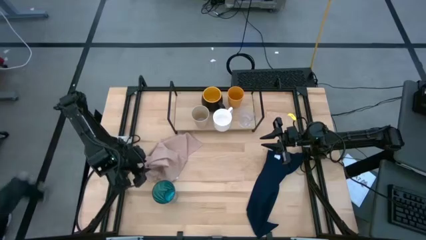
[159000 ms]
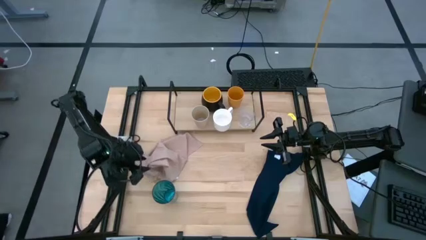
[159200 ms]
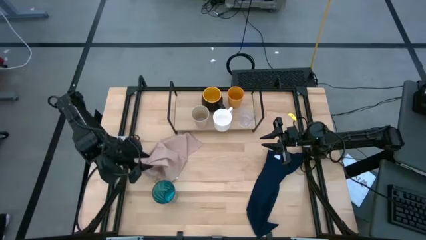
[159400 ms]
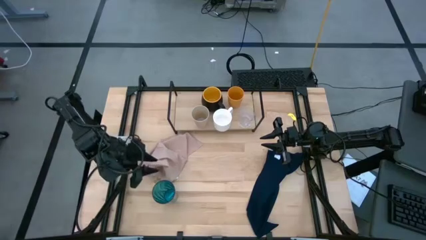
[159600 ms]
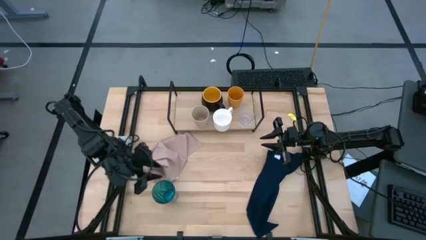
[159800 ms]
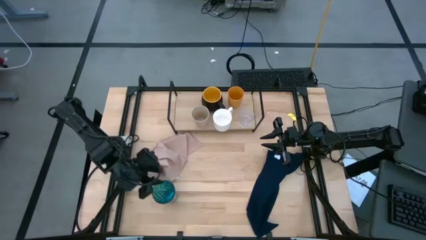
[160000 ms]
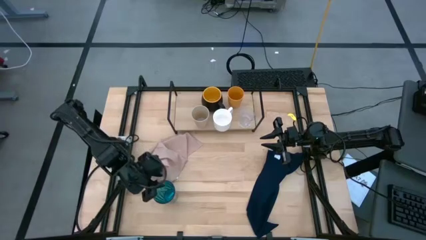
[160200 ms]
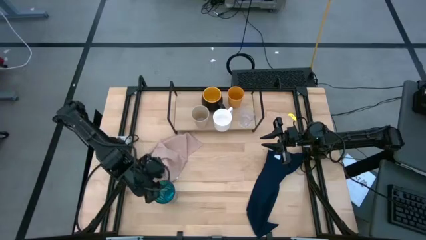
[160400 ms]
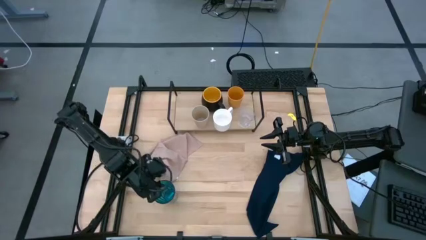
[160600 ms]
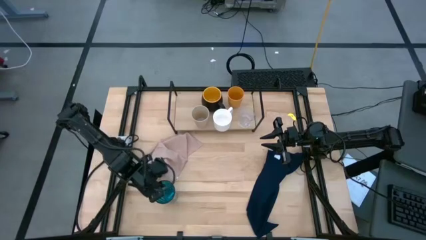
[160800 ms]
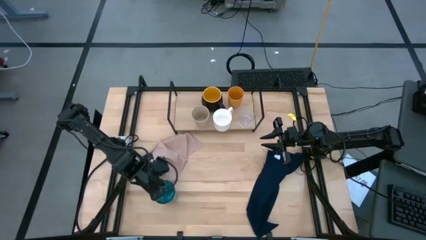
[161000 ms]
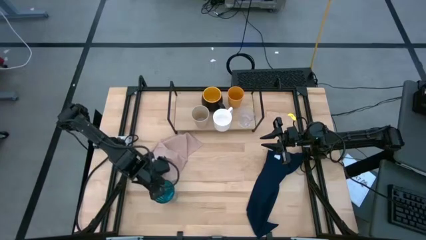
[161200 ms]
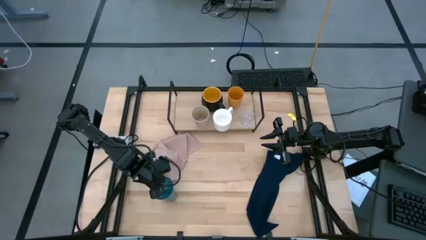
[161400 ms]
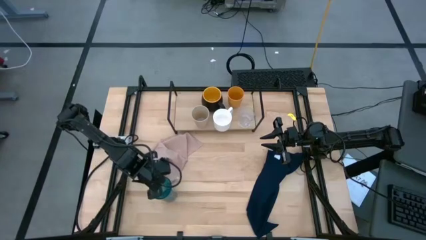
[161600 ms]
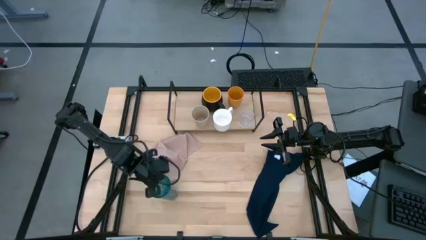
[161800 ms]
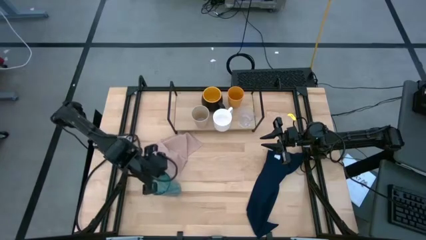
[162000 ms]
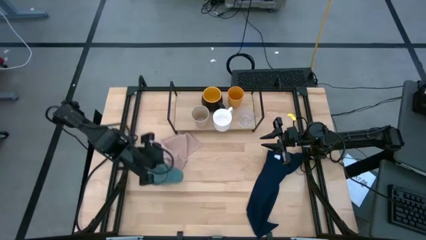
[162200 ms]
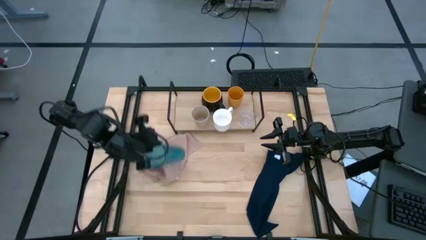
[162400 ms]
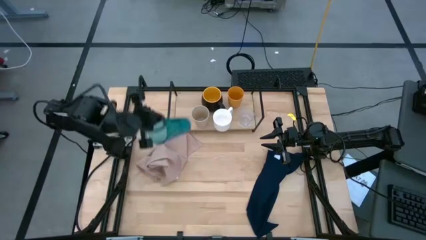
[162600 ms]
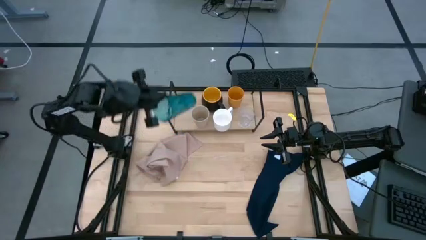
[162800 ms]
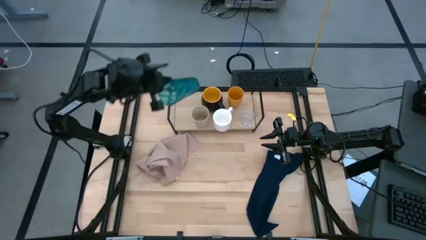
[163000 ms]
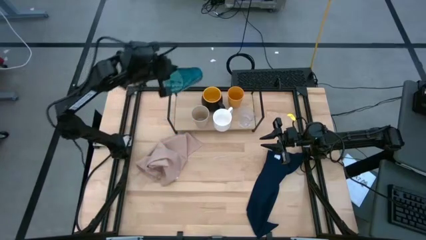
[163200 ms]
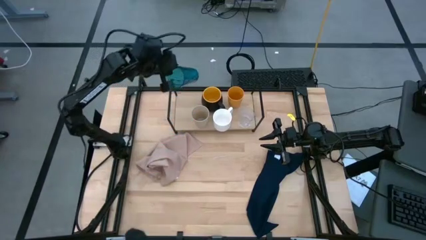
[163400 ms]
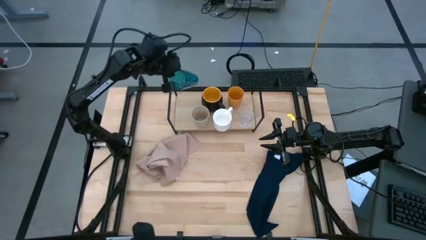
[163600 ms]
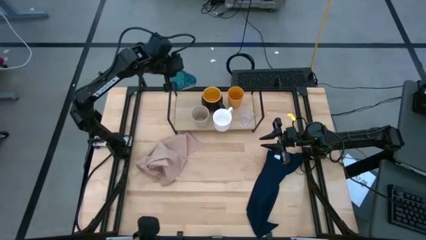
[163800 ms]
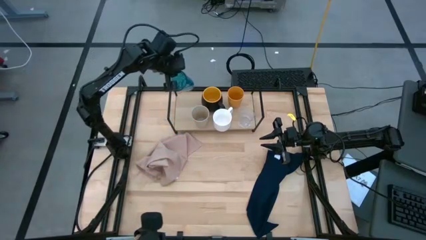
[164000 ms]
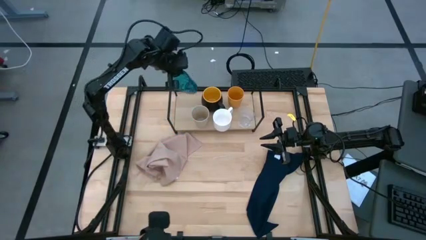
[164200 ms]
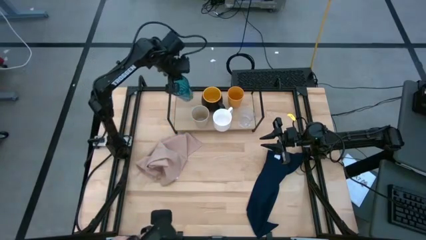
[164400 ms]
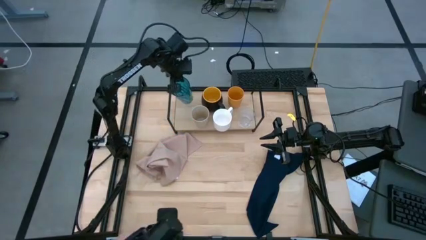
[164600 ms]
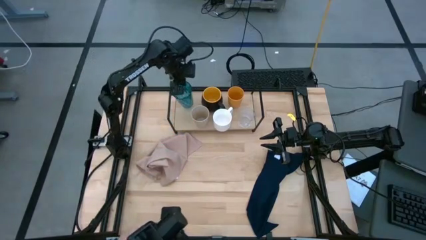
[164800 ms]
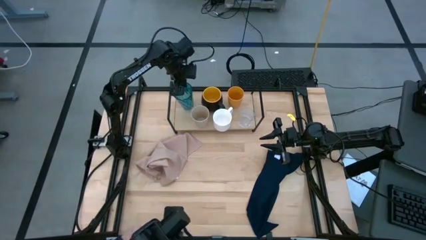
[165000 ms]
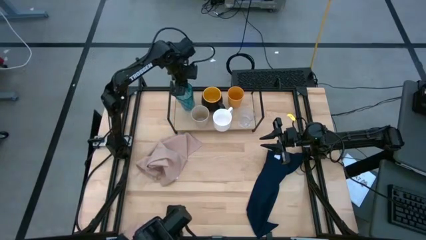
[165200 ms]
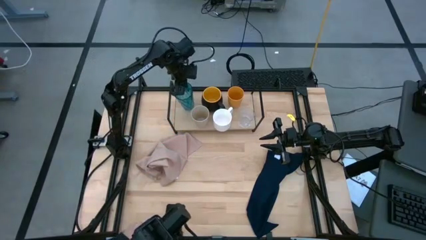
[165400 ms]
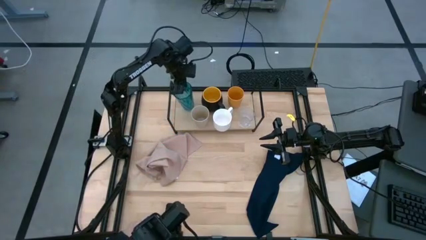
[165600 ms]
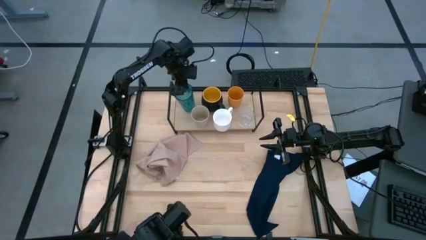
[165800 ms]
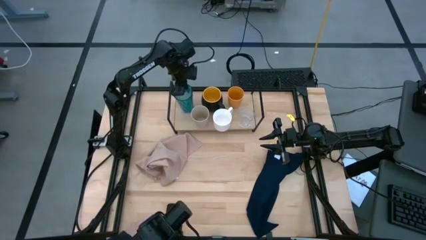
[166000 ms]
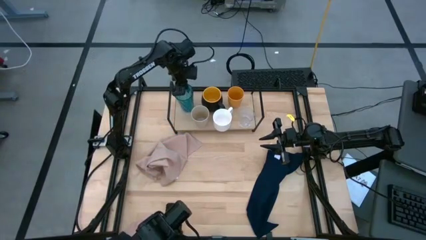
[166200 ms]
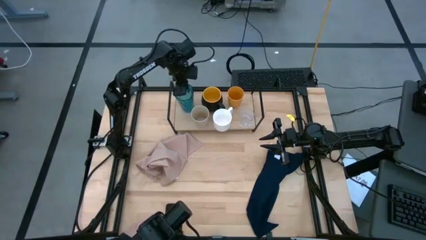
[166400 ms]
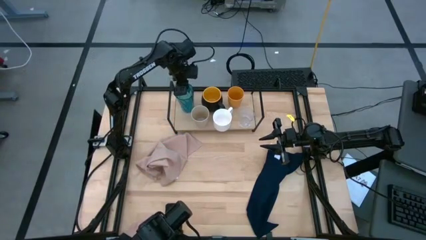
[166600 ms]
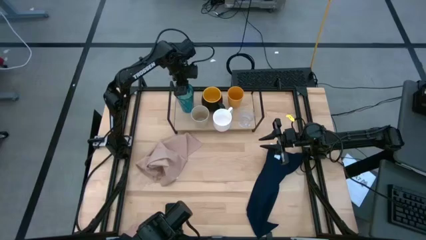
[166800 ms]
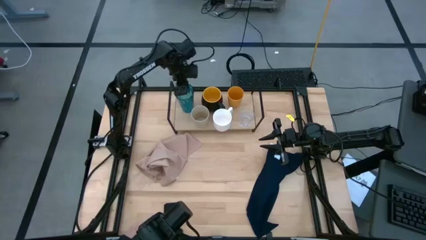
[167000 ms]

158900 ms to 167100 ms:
Task: Stack small to large cups/mugs on shelf
Put the blue cup on the shelf

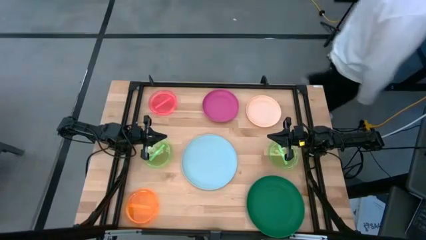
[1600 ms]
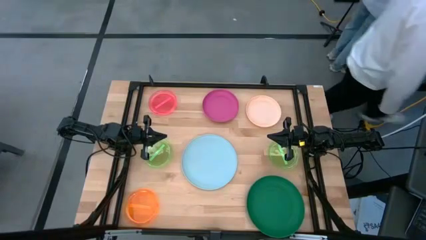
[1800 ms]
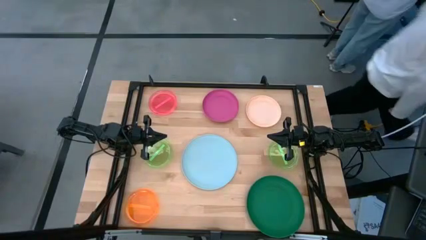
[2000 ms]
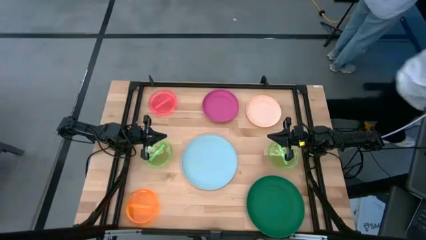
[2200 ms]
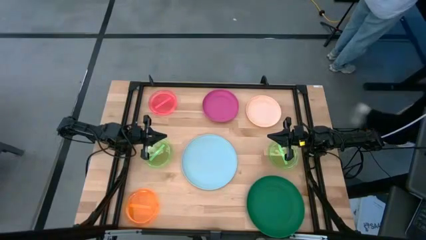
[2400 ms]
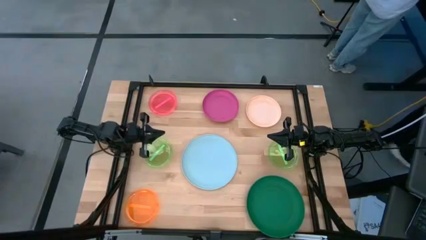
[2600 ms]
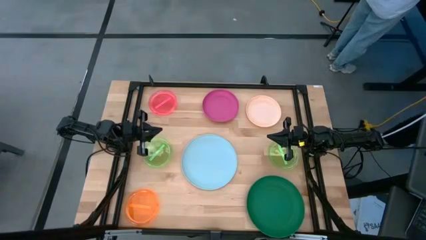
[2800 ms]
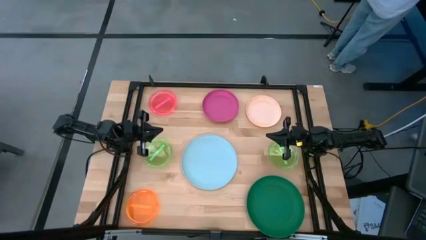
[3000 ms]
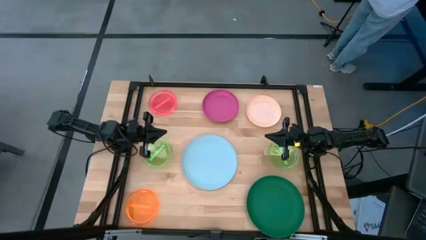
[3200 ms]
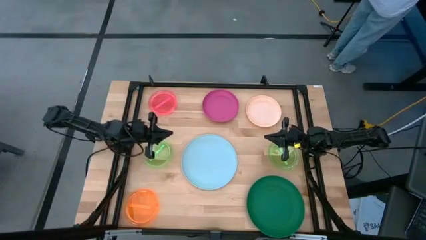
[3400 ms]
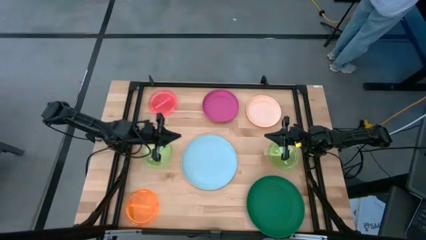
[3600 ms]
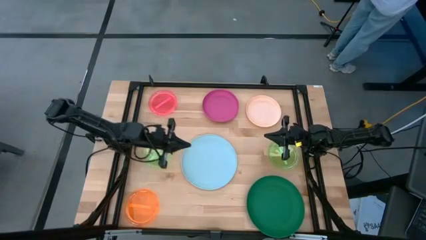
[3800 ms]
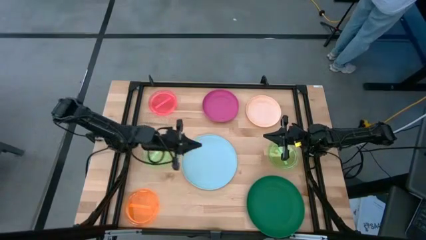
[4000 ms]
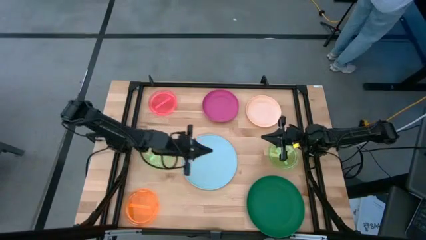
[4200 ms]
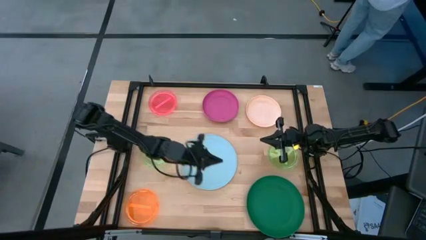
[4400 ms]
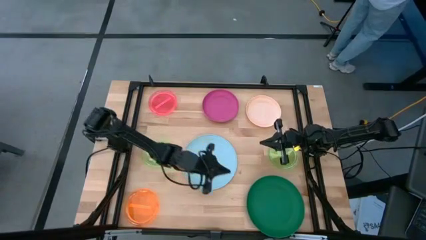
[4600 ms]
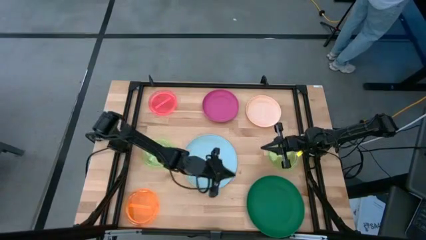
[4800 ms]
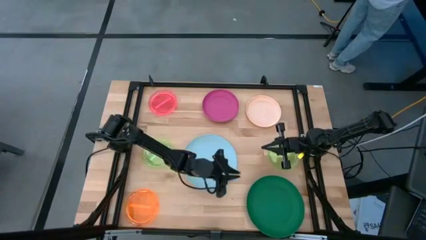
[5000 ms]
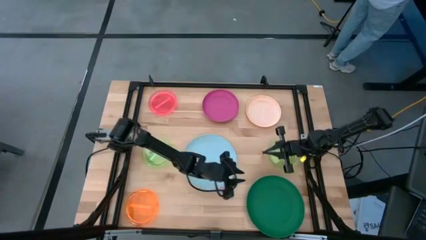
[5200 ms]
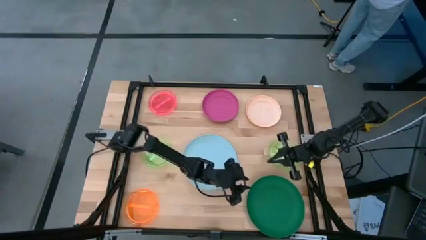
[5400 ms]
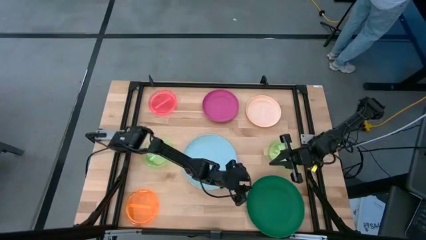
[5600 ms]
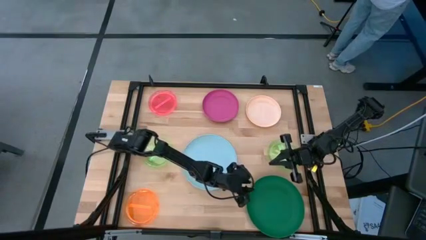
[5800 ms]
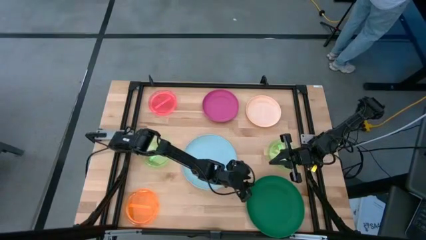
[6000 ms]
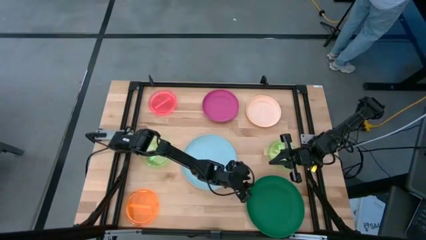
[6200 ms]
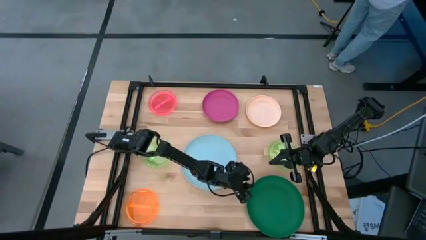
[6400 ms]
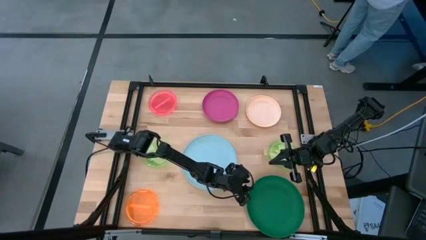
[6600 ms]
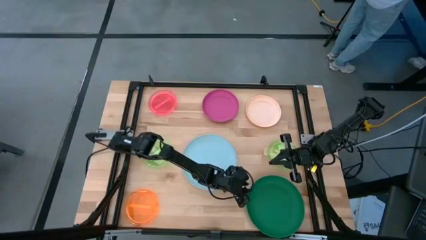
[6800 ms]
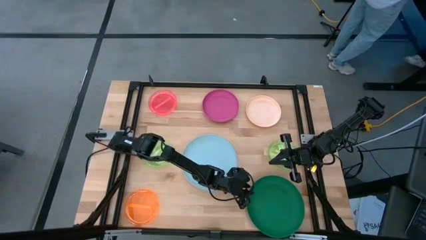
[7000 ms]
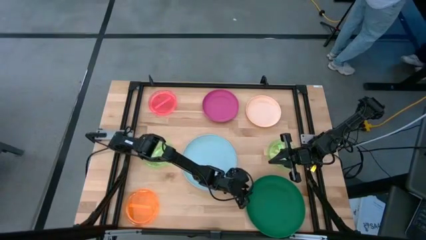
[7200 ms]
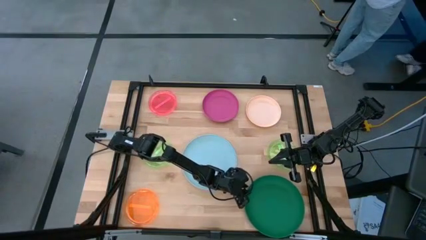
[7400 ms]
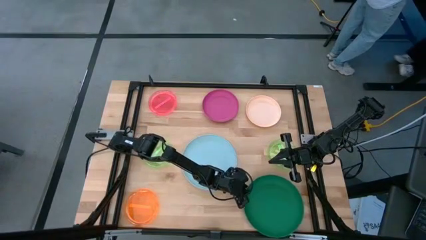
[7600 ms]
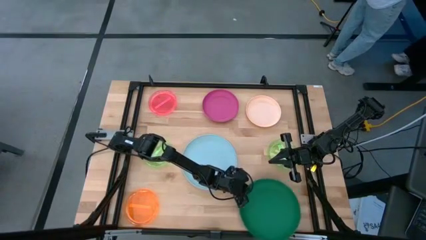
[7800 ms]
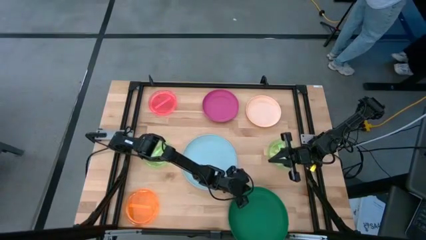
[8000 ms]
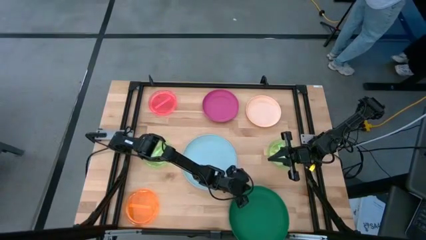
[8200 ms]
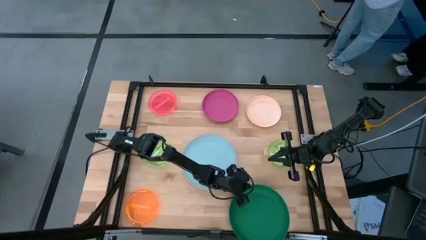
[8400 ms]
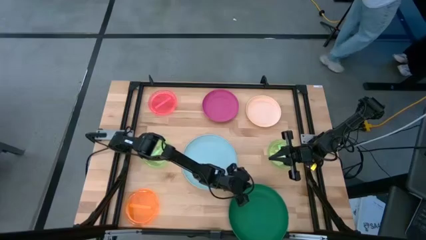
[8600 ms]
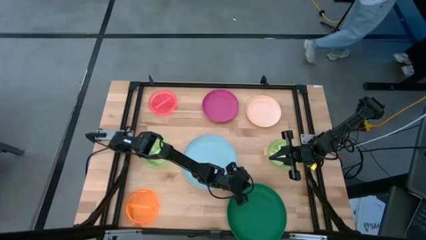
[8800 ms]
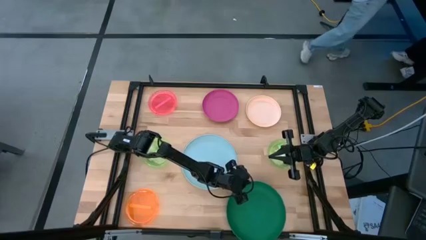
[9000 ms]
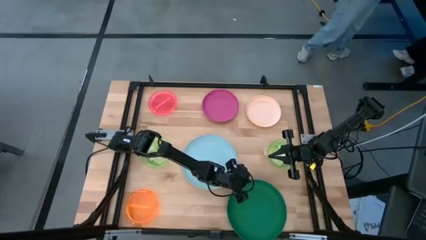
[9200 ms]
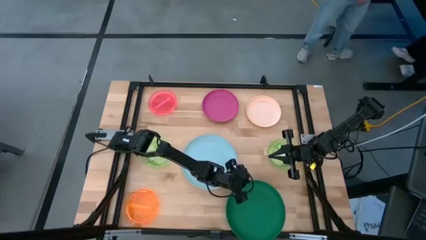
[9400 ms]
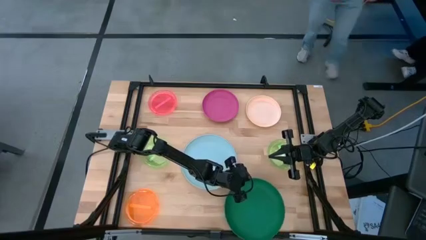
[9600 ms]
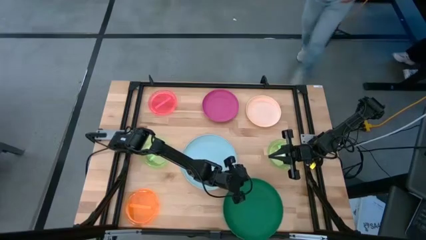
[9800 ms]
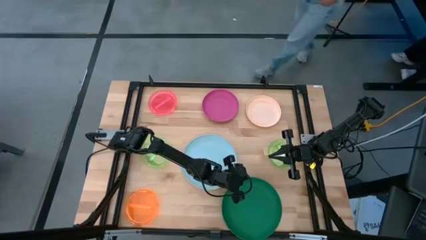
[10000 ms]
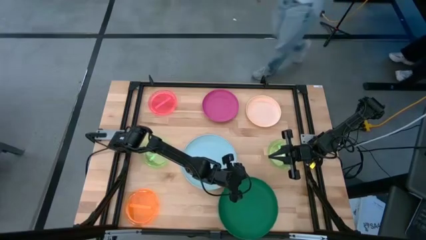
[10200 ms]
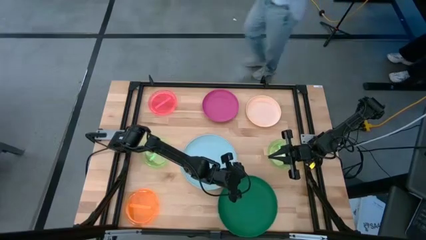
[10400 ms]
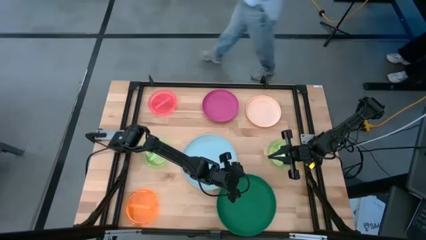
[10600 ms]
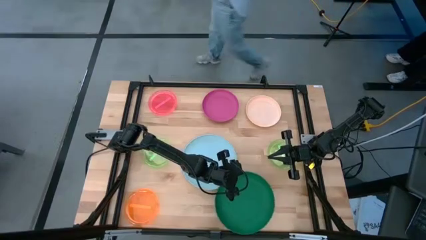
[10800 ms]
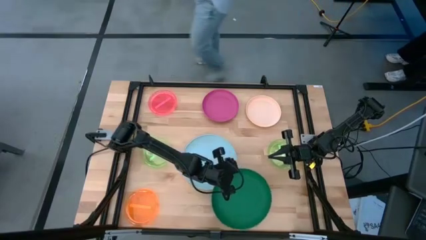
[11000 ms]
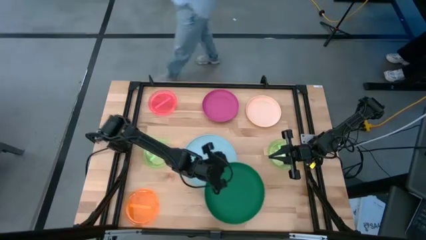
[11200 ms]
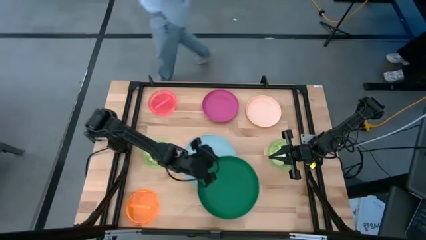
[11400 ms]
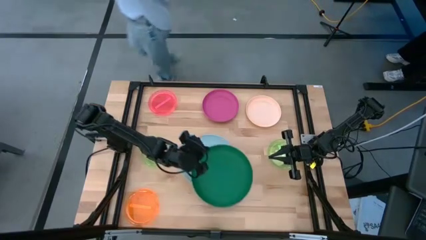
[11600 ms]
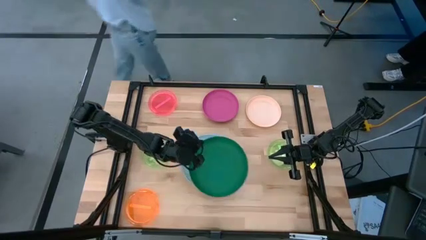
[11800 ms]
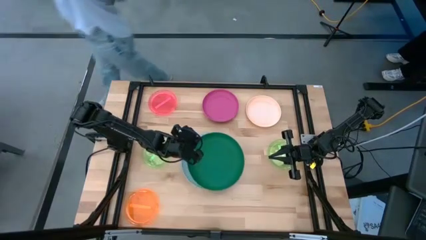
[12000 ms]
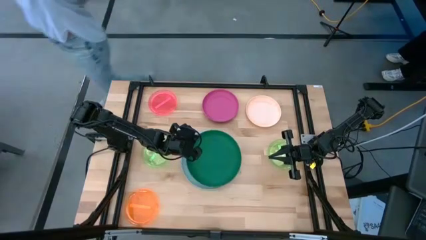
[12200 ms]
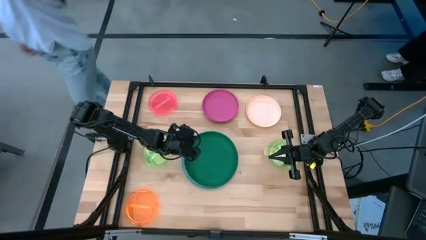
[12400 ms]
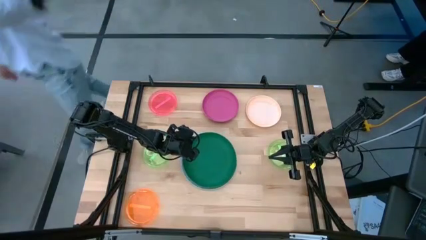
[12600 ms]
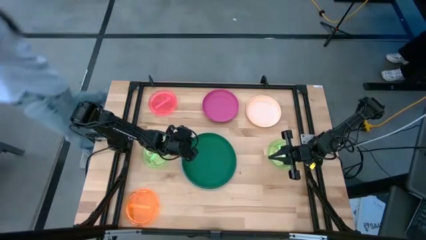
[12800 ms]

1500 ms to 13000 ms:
Task: Stack plastic plates
Stack the dark green plate on top of the blue plate
